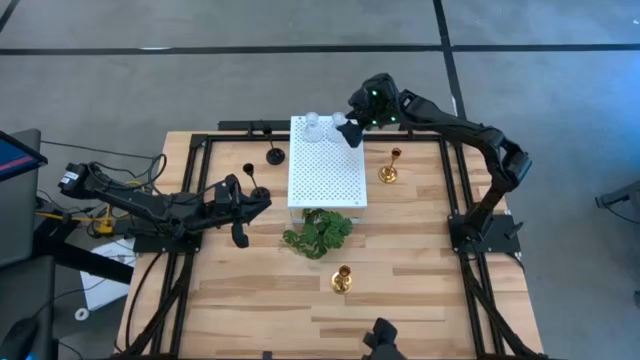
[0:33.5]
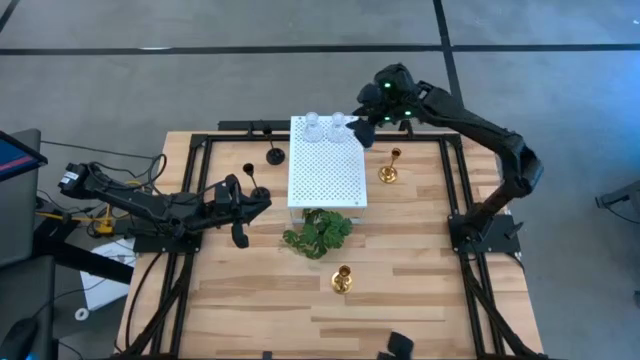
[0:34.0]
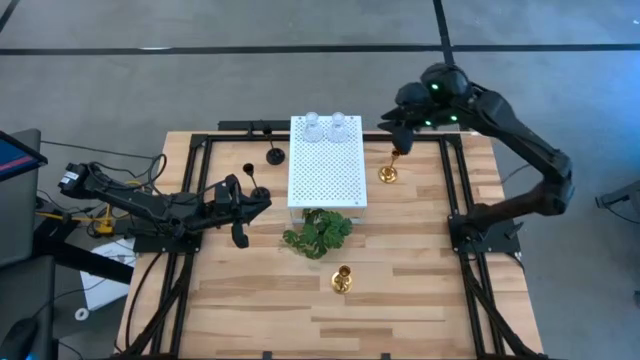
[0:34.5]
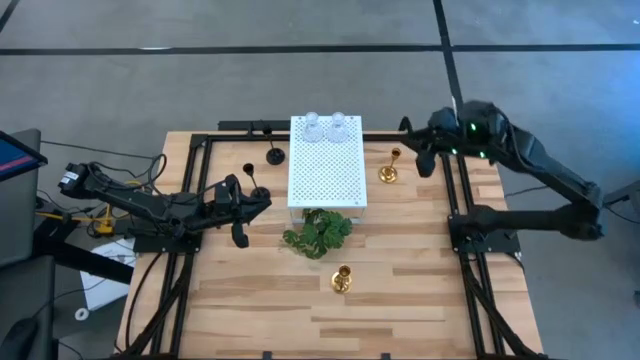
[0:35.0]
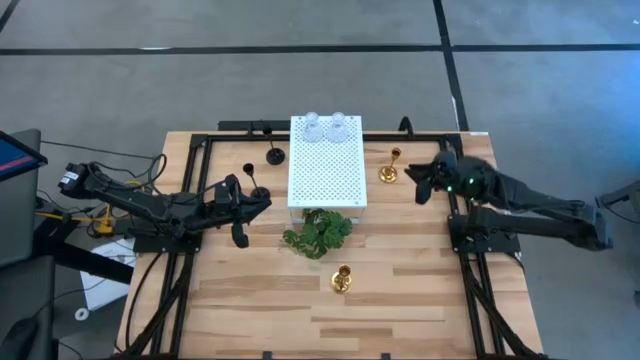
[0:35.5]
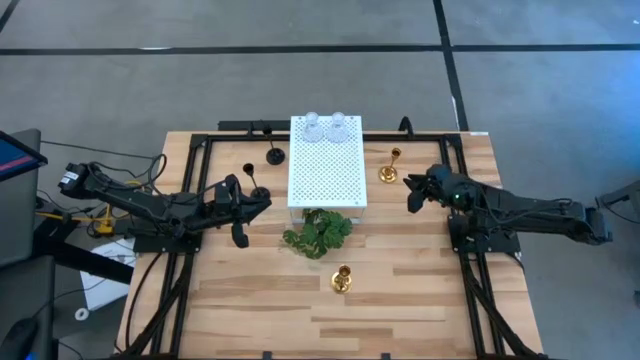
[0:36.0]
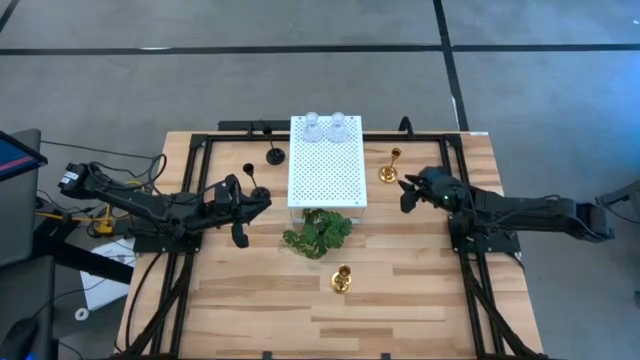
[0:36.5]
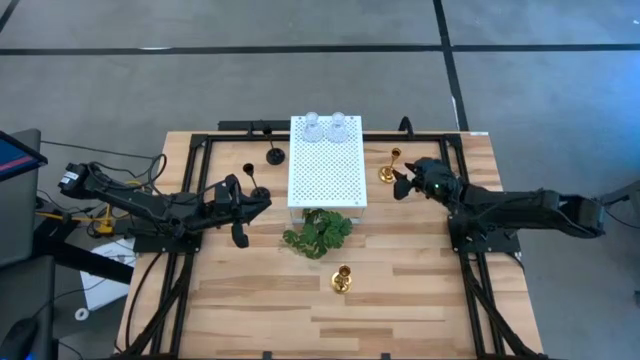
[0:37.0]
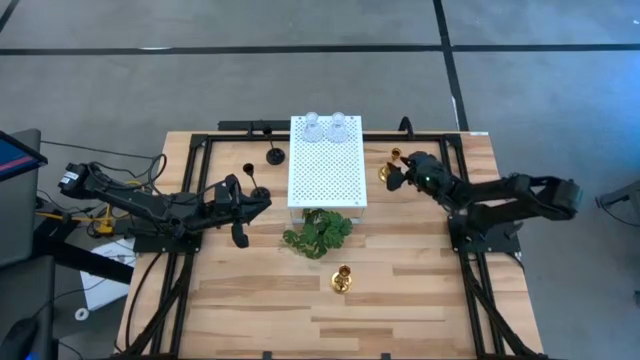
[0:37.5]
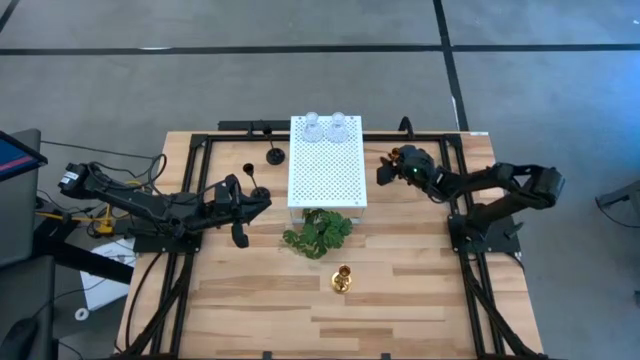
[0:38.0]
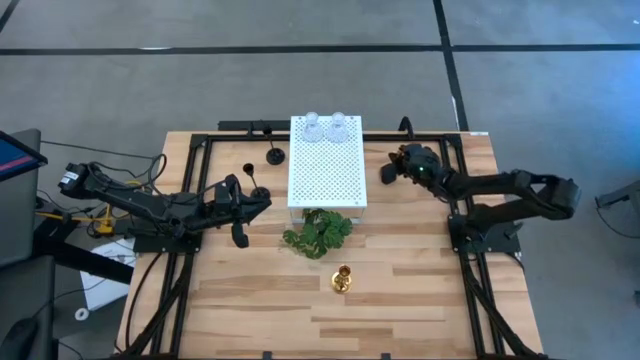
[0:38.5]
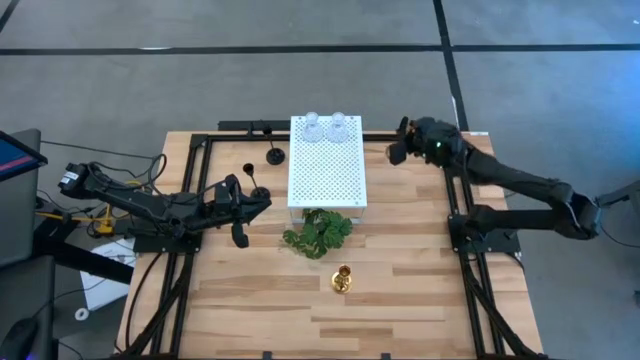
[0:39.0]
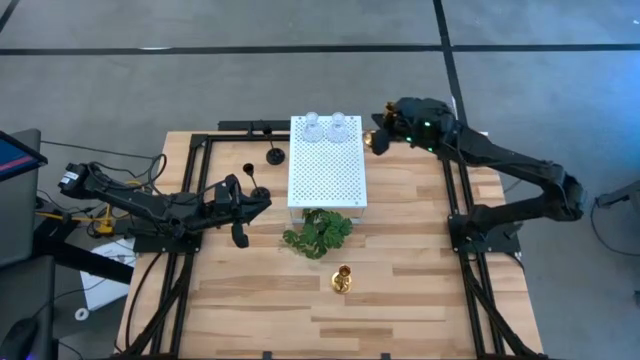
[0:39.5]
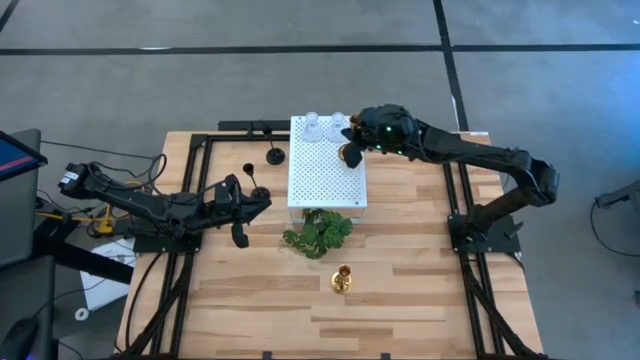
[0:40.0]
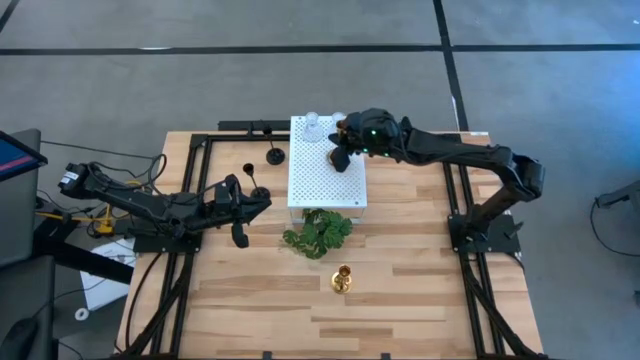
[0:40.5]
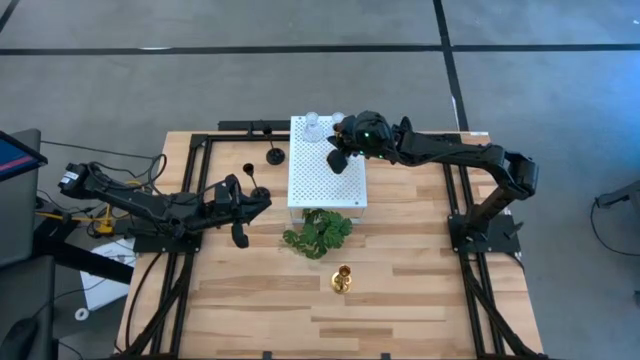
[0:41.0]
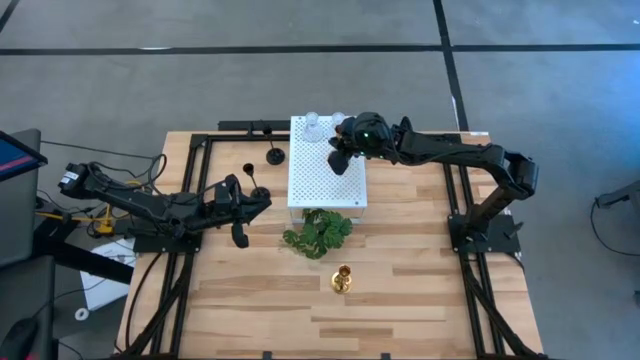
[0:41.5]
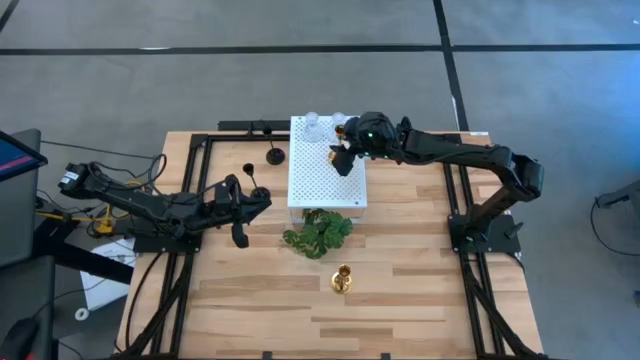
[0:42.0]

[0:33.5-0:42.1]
Task: Pick & Place candle stick holders
Put the top gold candle holder on the shelf

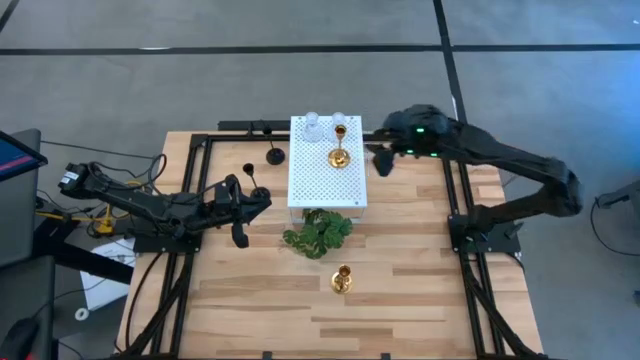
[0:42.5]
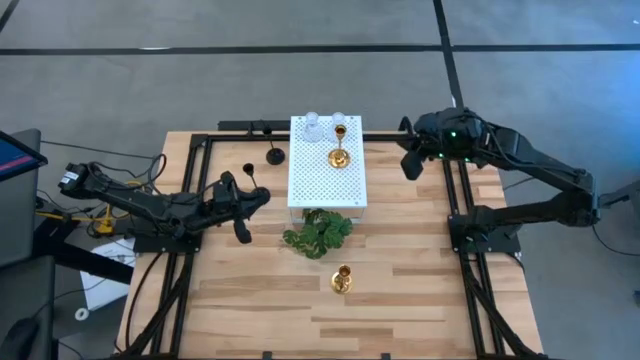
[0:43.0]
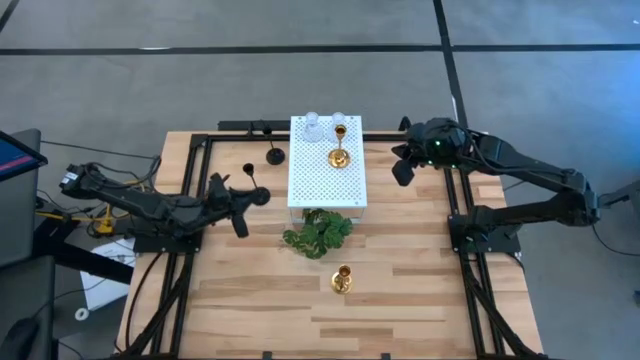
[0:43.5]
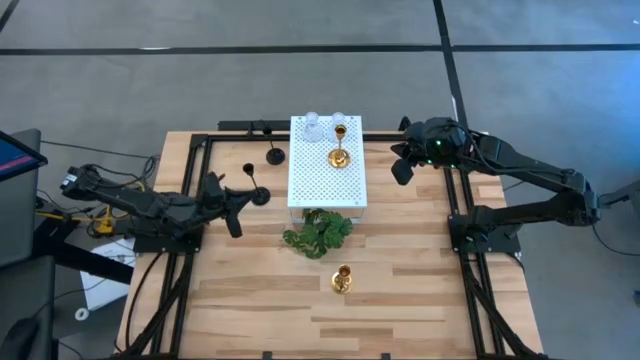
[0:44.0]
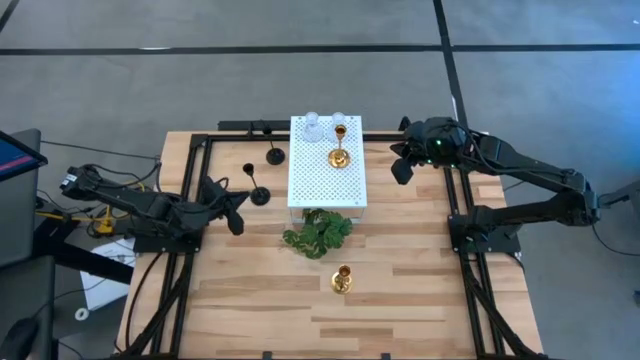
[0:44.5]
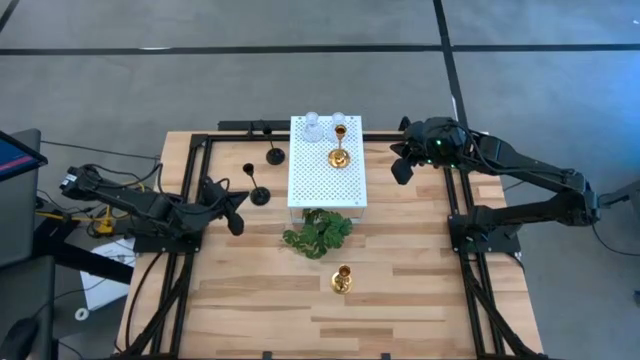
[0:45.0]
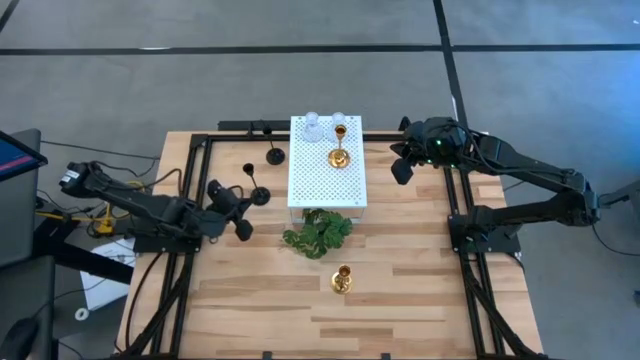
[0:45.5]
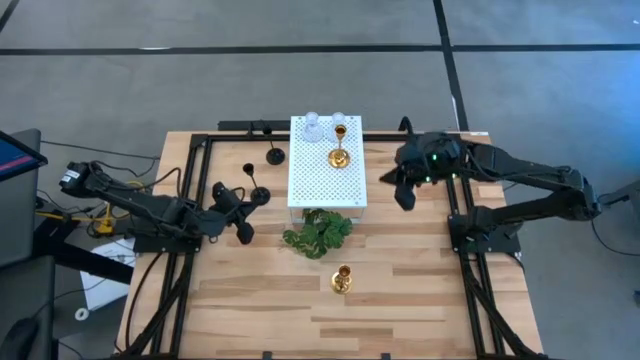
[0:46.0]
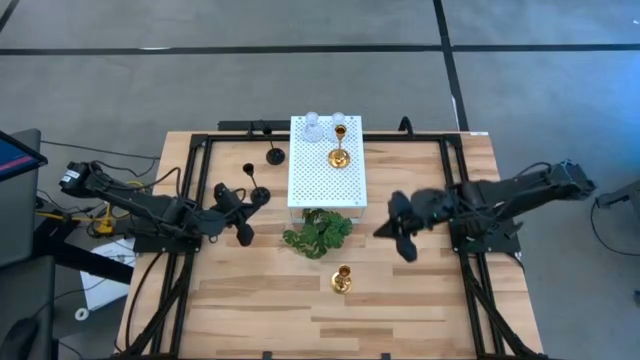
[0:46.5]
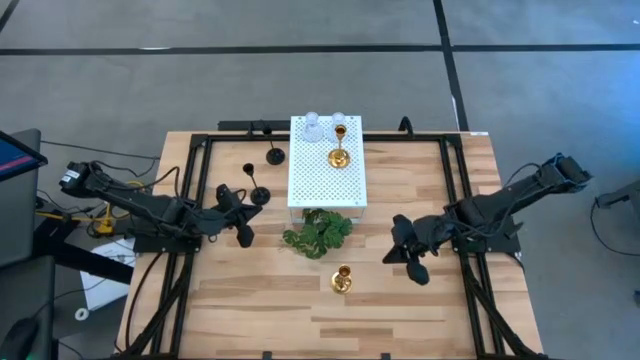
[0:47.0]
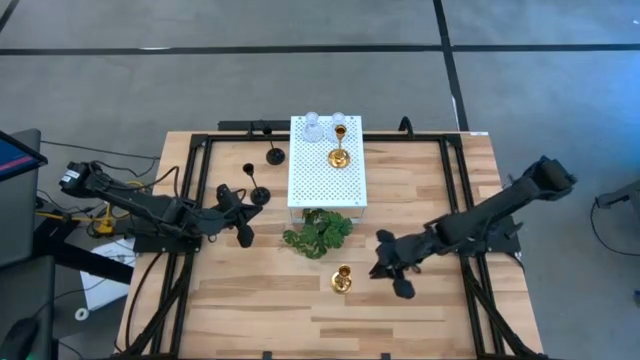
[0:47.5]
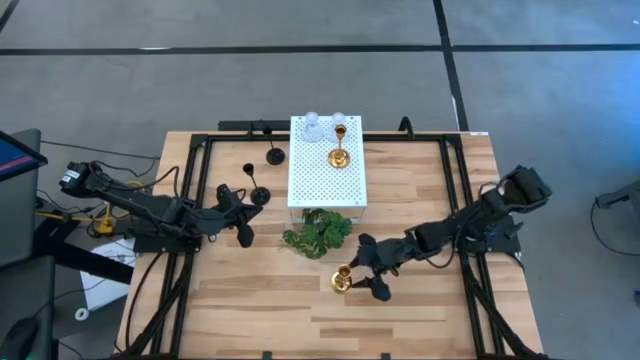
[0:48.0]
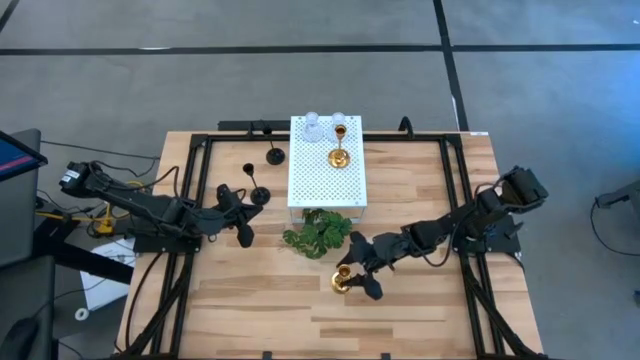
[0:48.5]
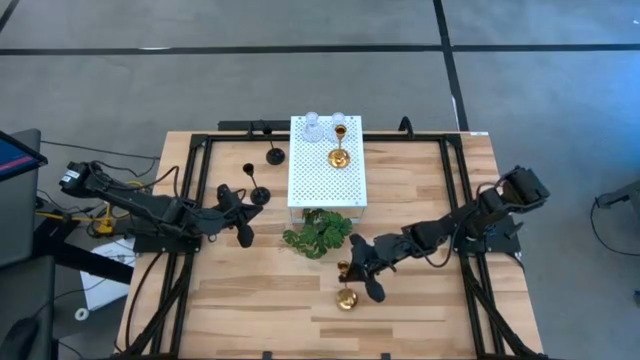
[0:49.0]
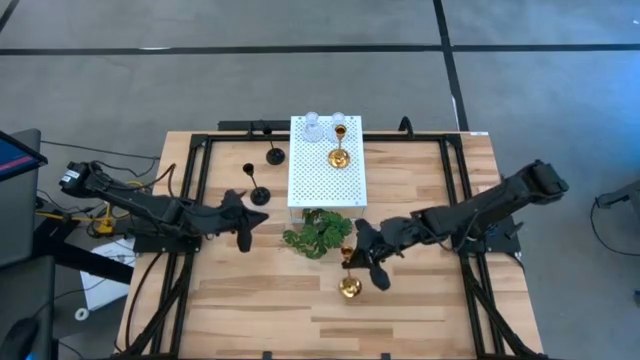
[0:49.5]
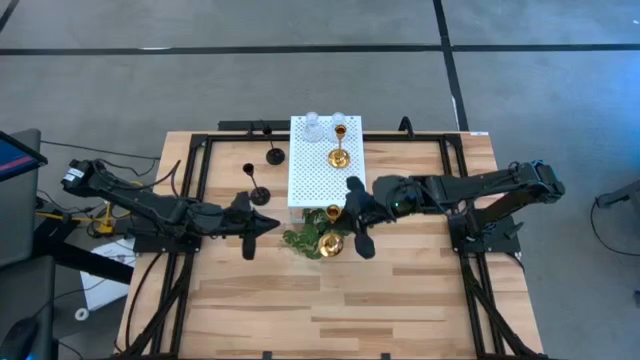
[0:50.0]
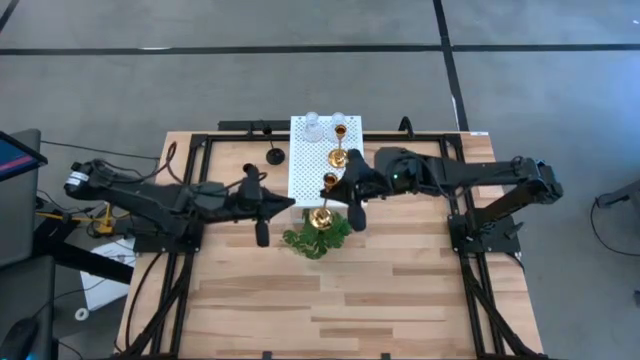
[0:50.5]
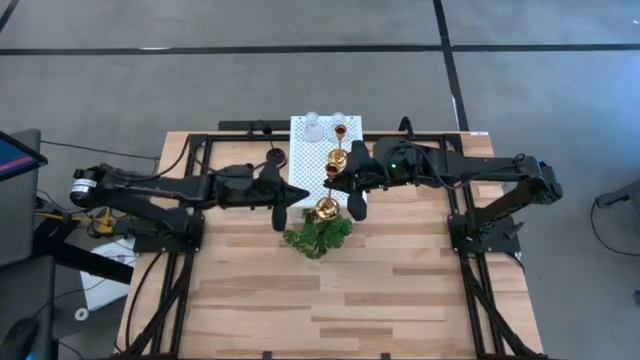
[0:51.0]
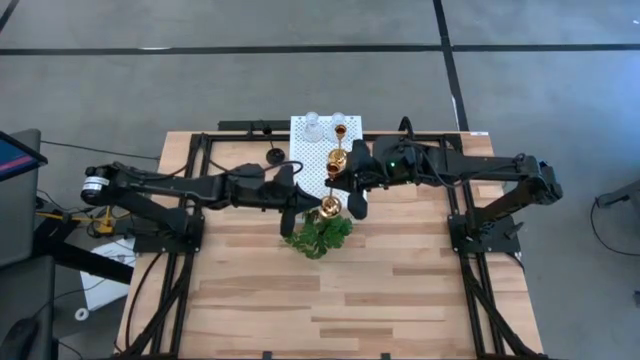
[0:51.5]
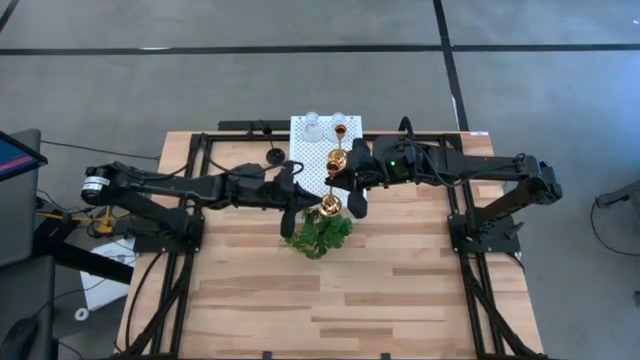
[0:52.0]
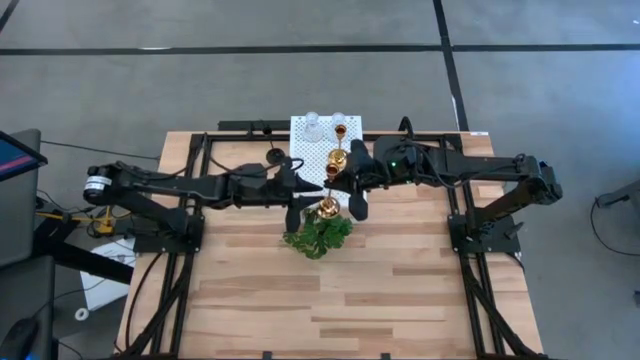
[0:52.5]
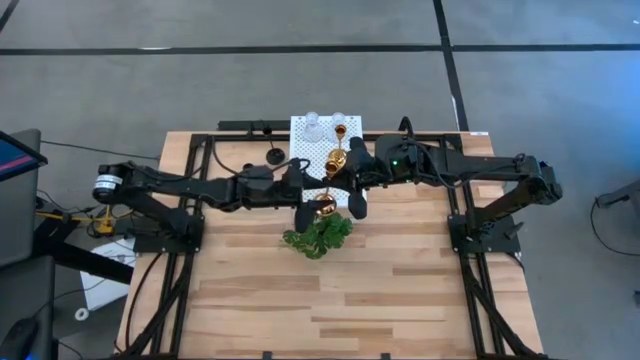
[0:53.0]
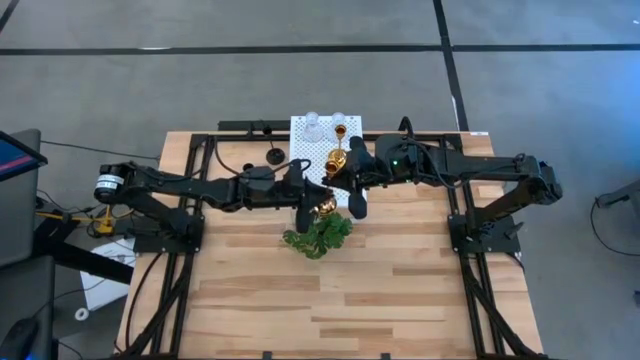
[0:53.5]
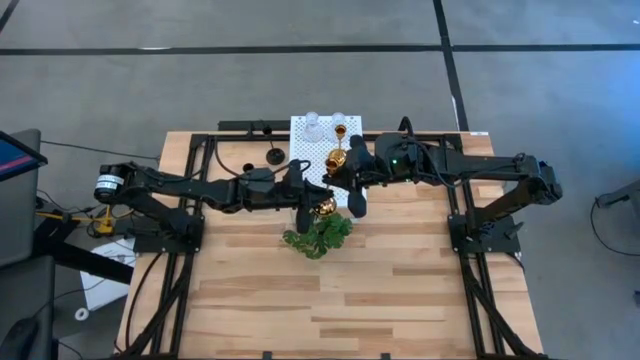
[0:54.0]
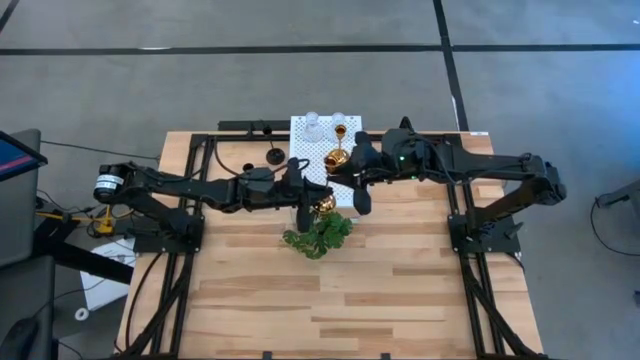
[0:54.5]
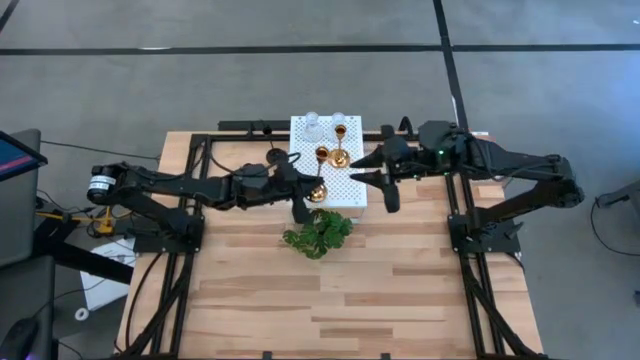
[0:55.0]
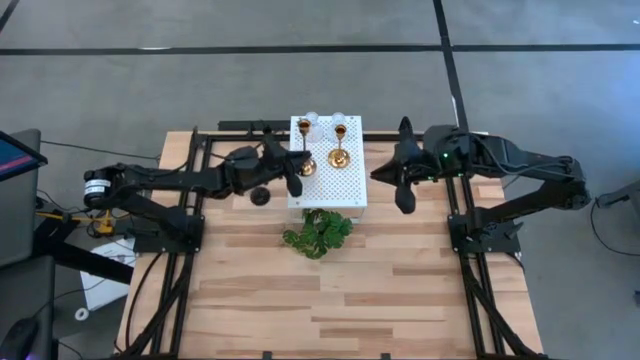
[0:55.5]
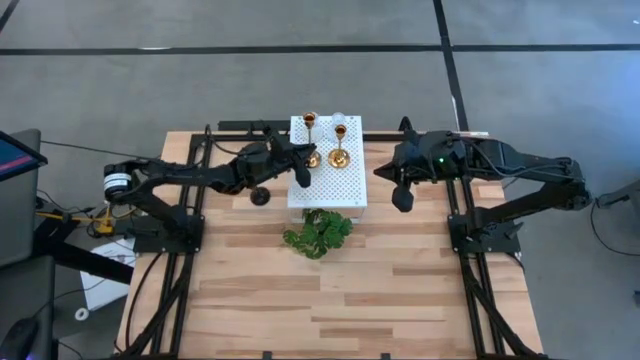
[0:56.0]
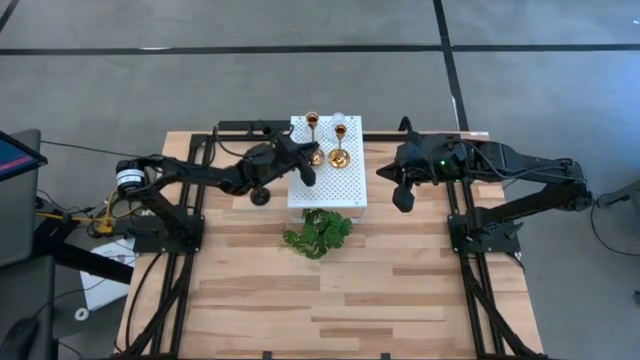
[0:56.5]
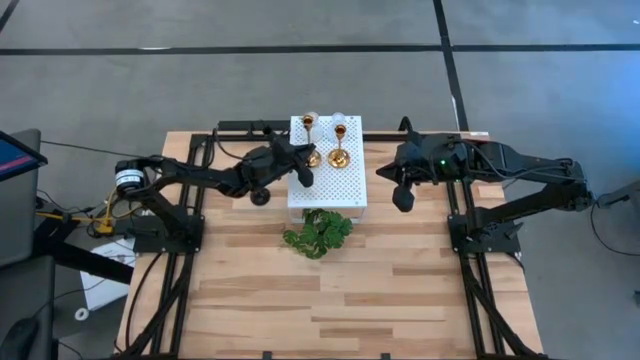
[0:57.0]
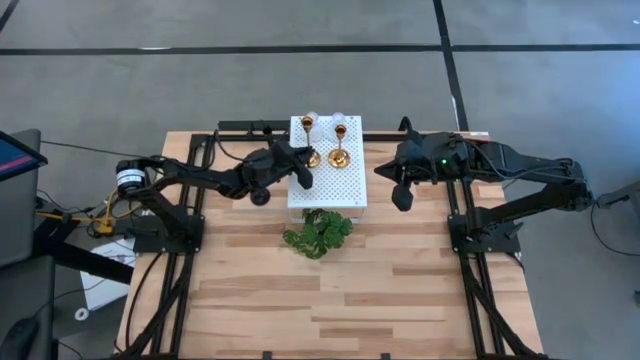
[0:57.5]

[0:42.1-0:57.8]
Align the gold candle holder with the other gold candle holder on the shelf
